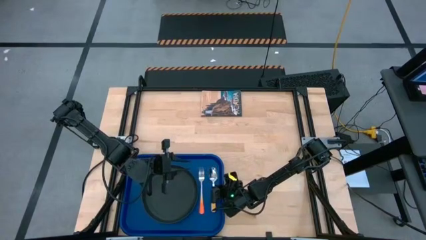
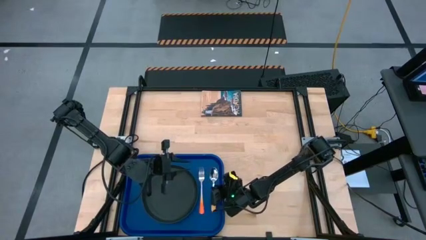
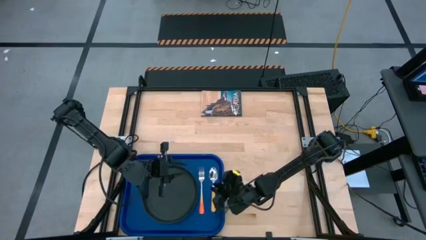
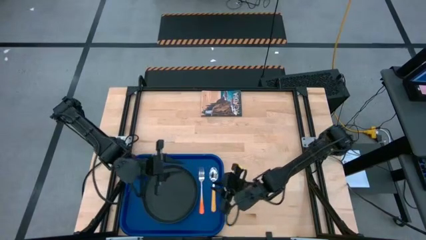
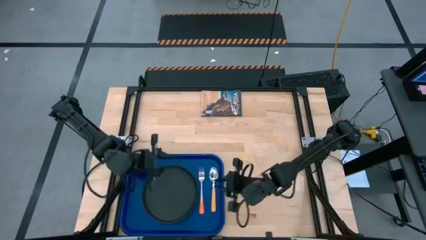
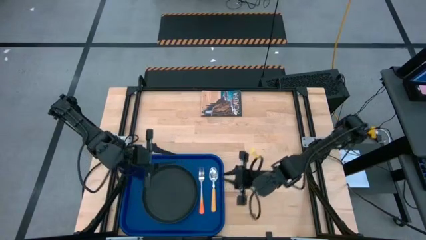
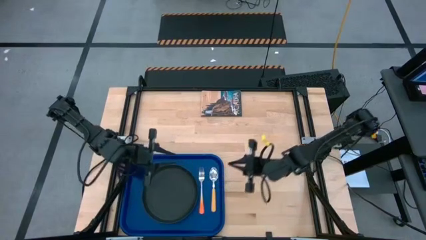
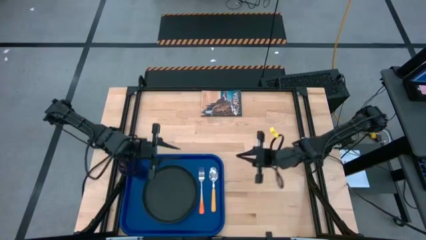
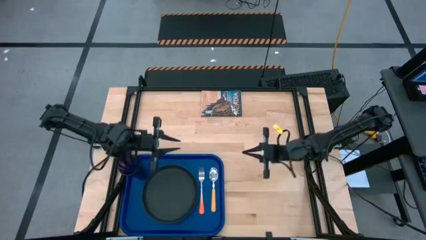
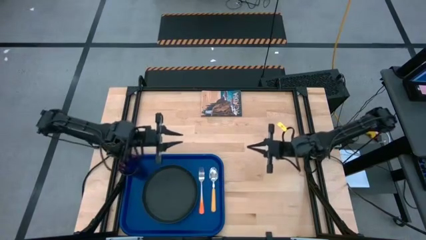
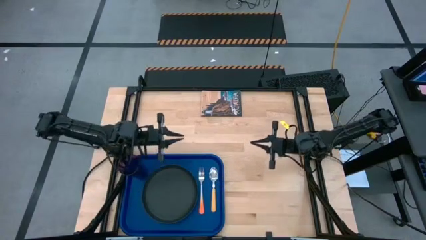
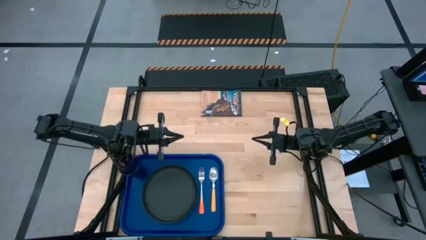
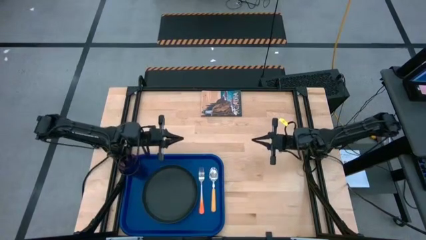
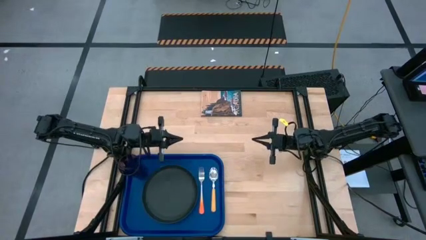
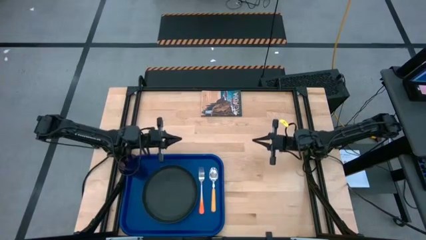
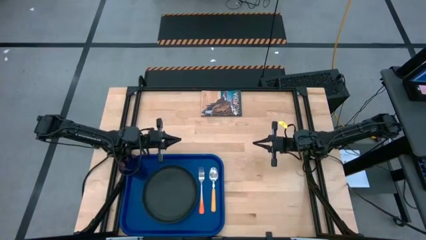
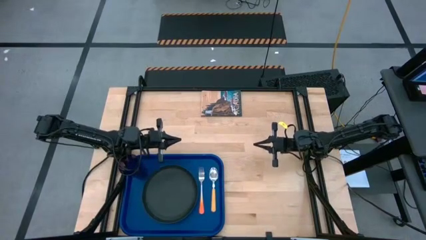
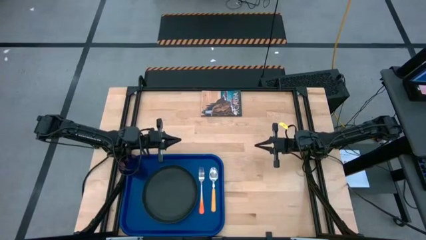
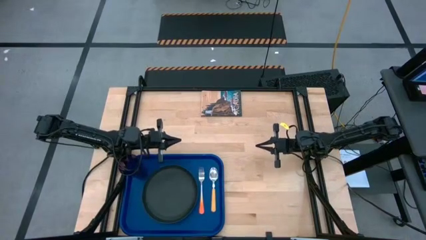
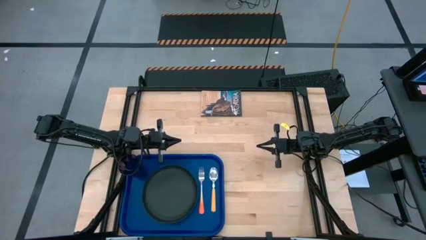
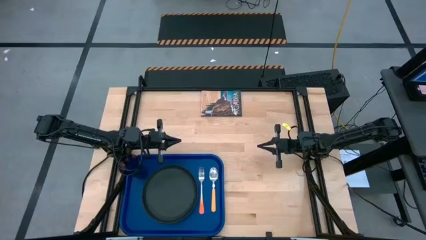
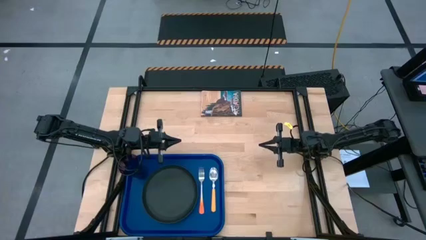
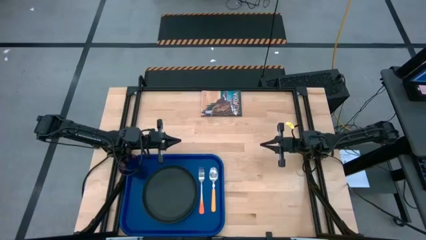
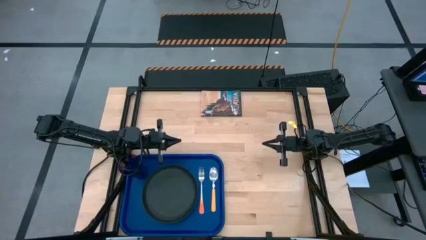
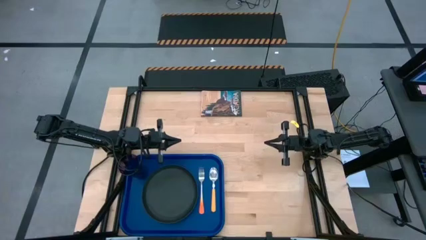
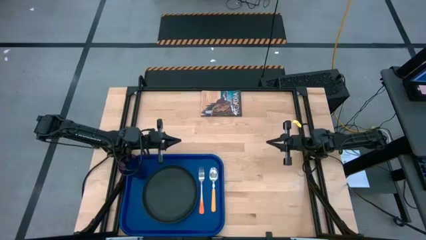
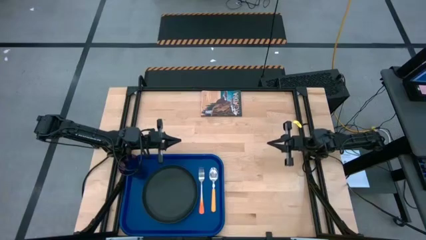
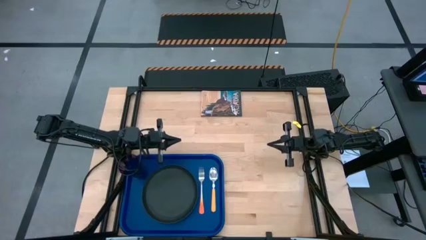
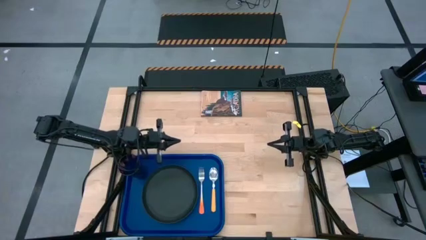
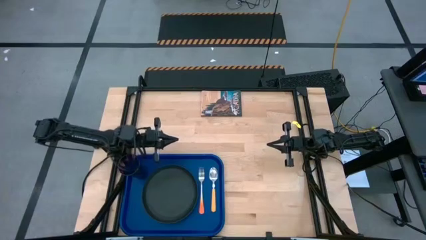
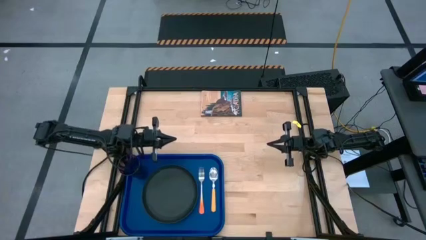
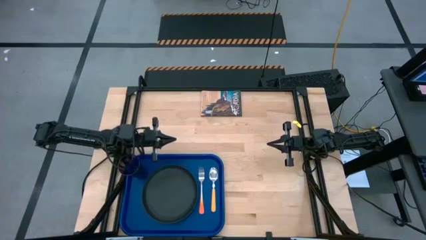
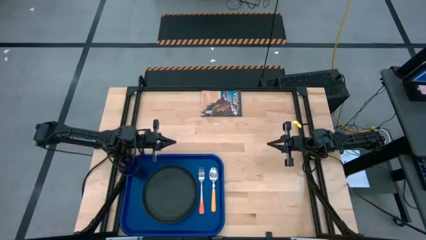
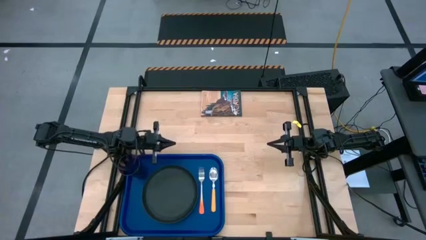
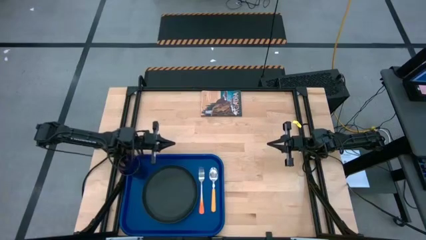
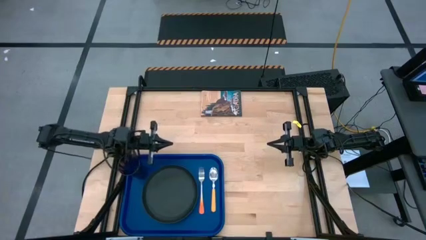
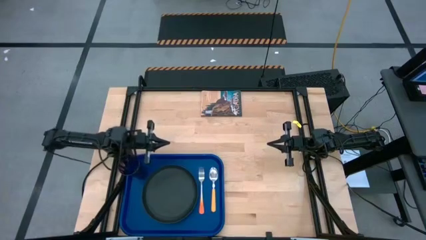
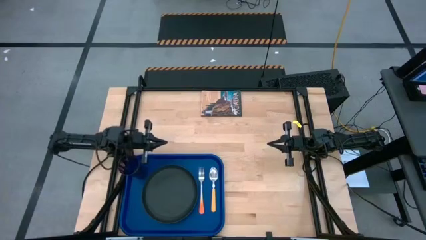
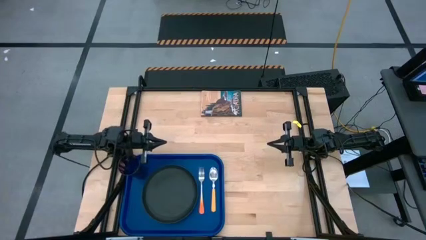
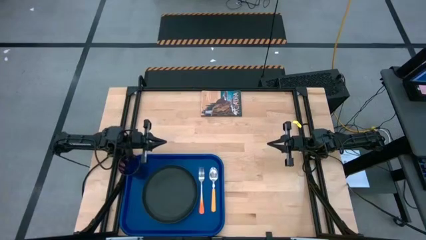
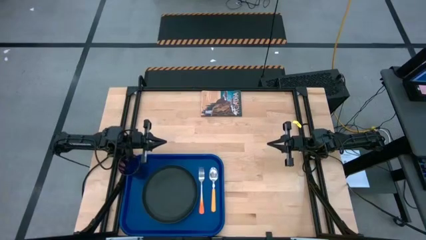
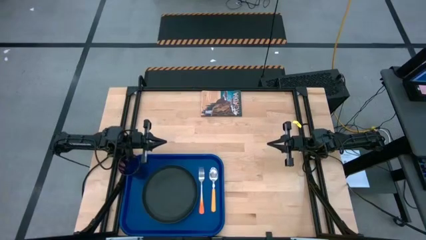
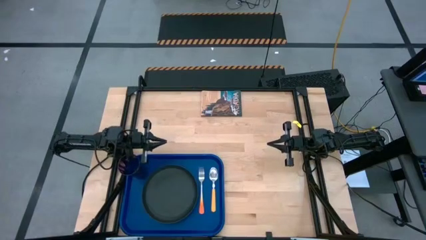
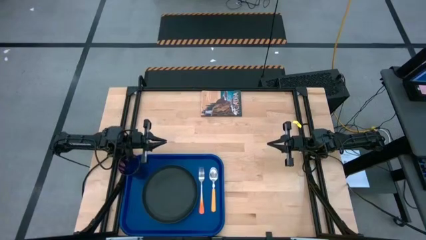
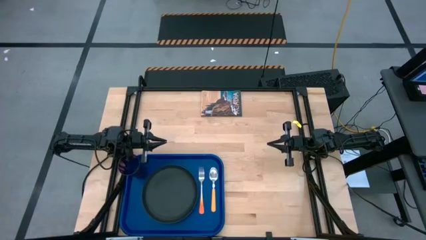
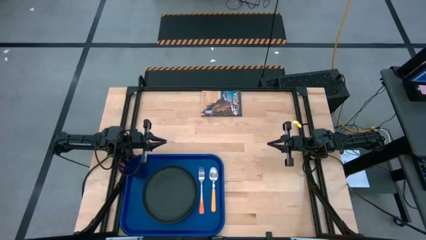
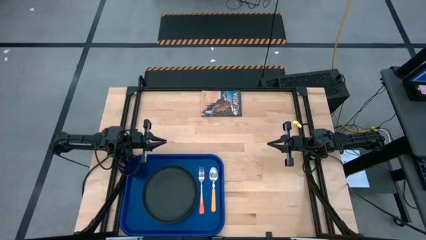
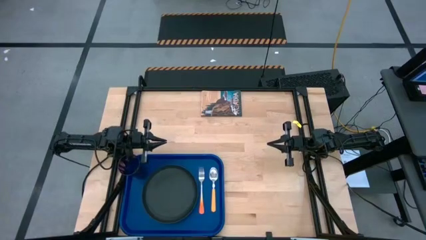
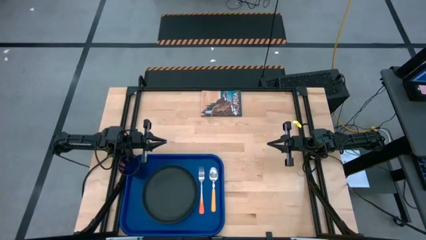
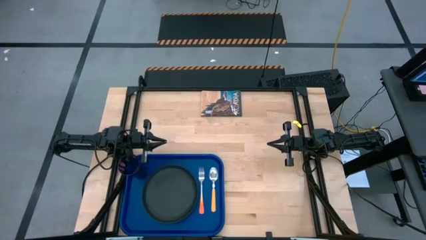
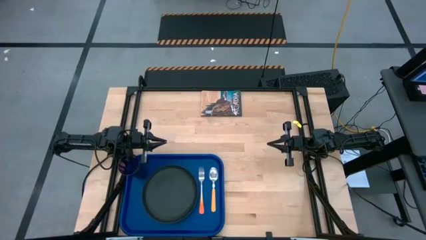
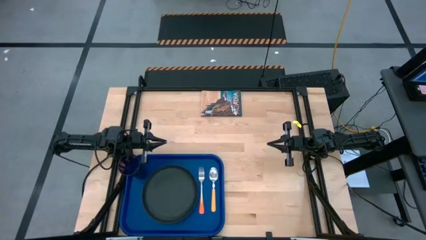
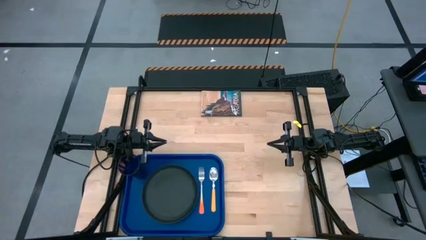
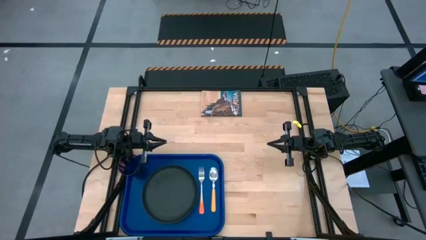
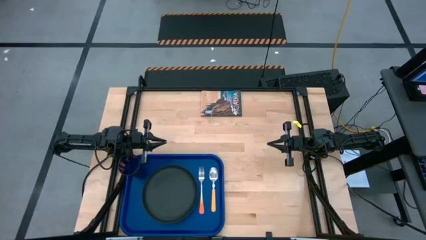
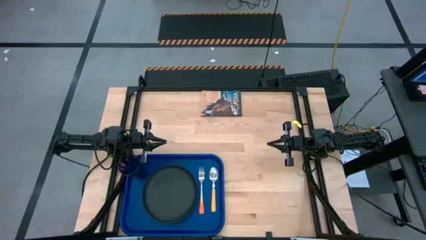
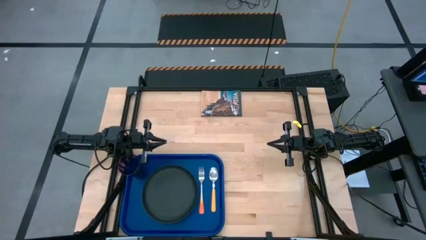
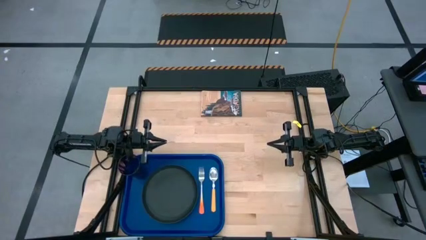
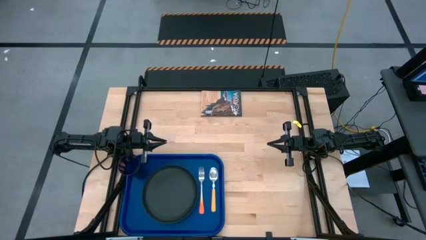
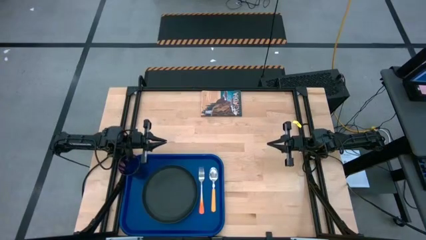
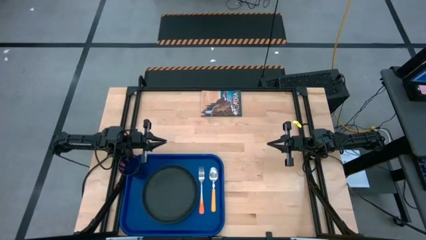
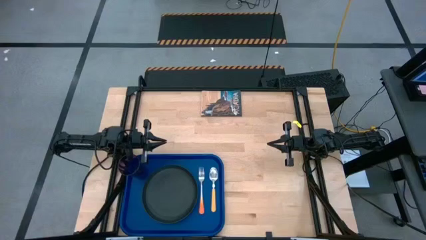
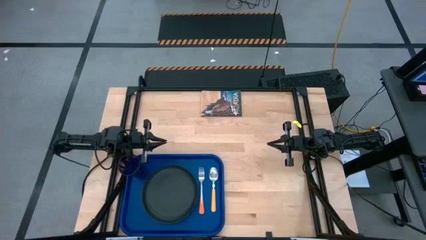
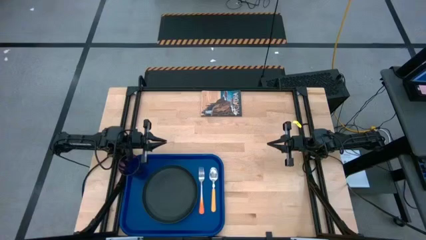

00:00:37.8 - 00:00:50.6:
Task: Pick and place plate/cup/fork/spoon on tray
Return to Home Position
